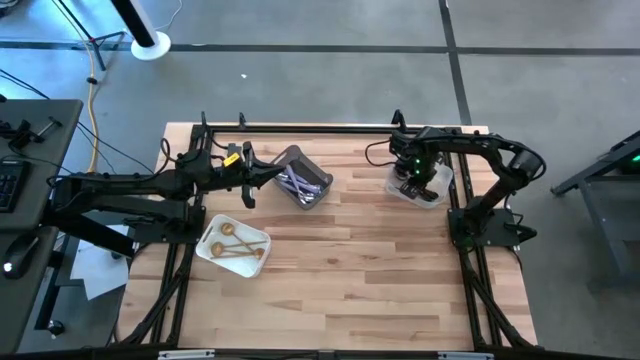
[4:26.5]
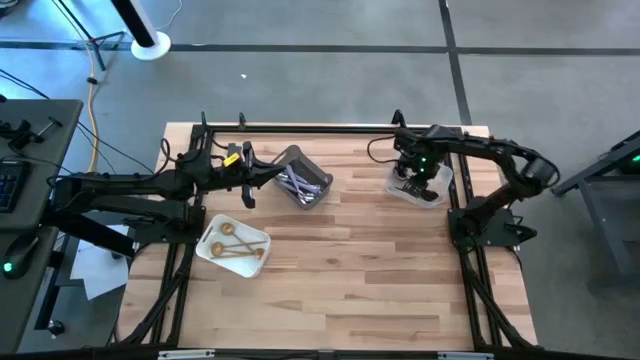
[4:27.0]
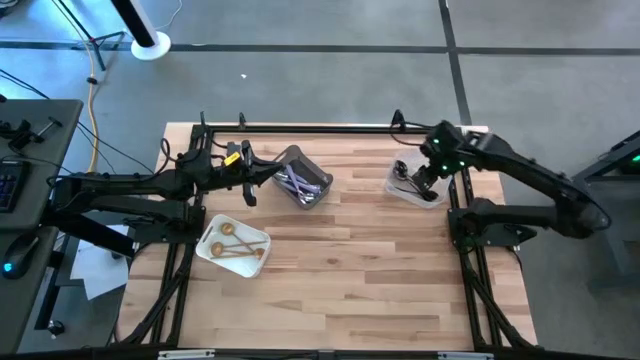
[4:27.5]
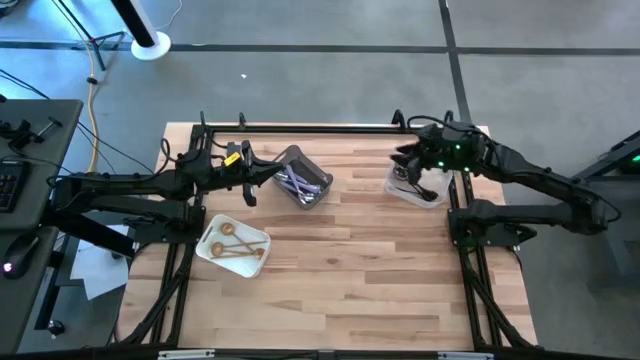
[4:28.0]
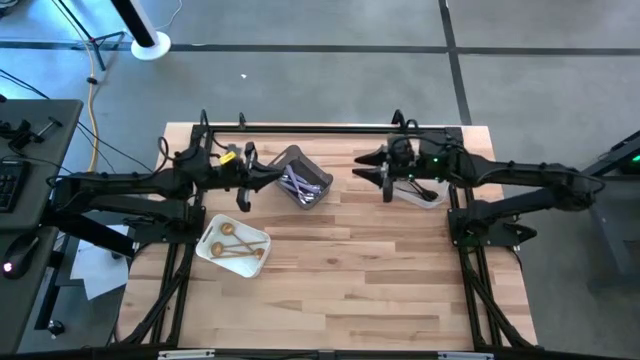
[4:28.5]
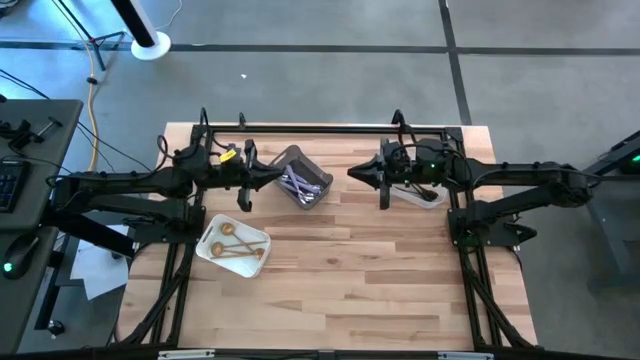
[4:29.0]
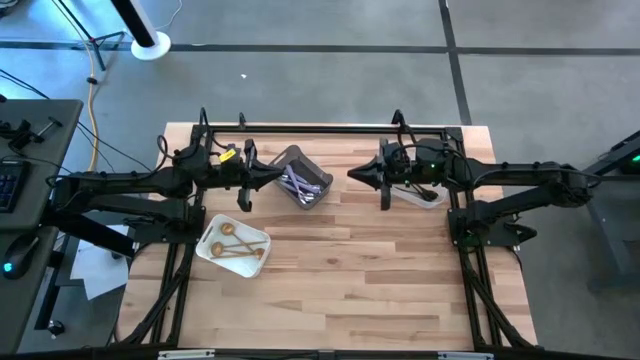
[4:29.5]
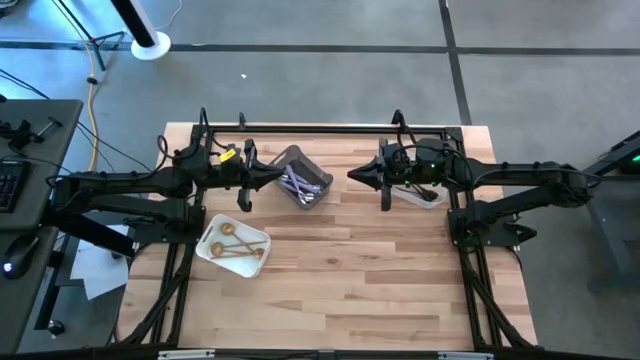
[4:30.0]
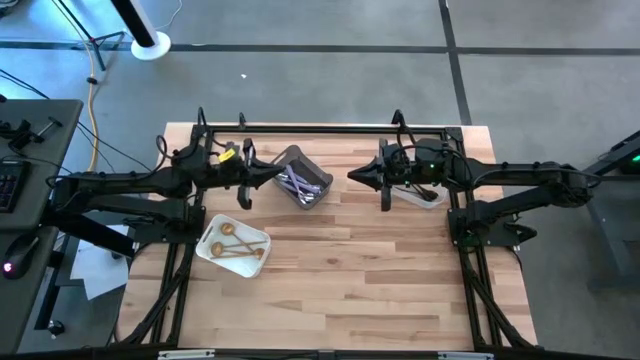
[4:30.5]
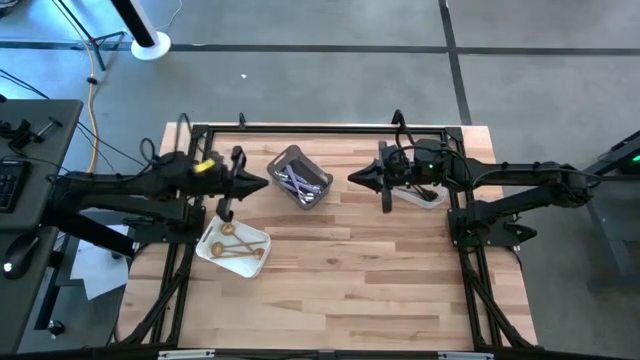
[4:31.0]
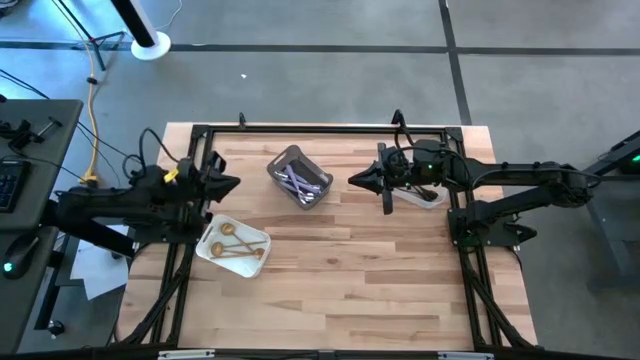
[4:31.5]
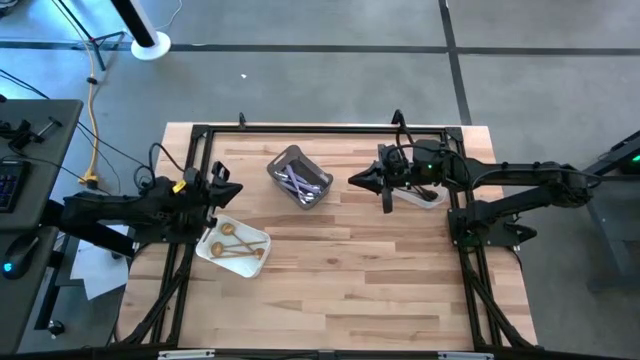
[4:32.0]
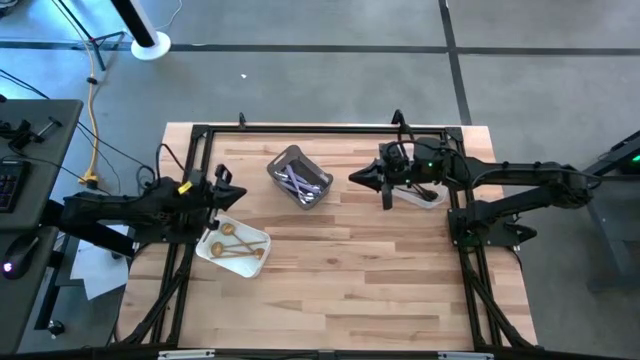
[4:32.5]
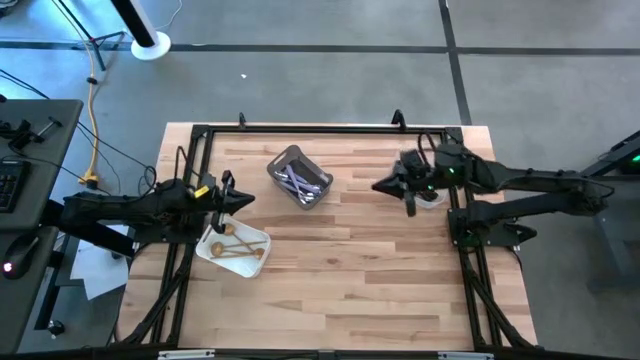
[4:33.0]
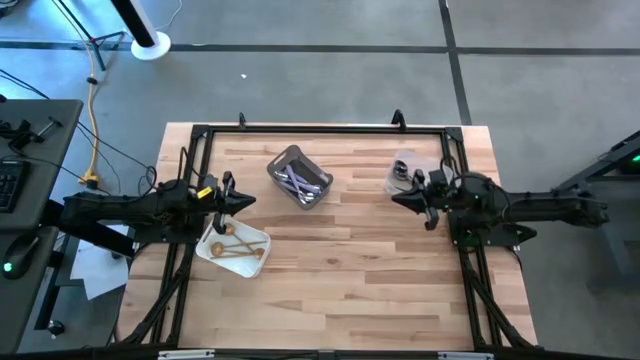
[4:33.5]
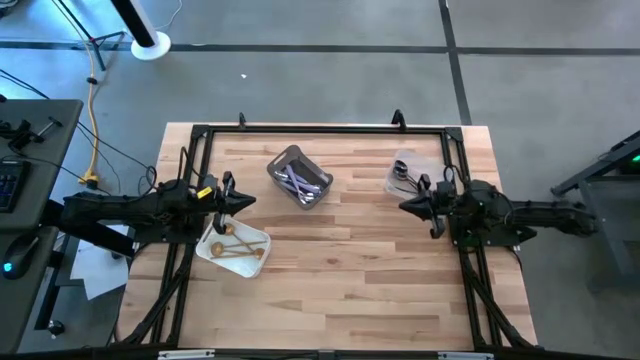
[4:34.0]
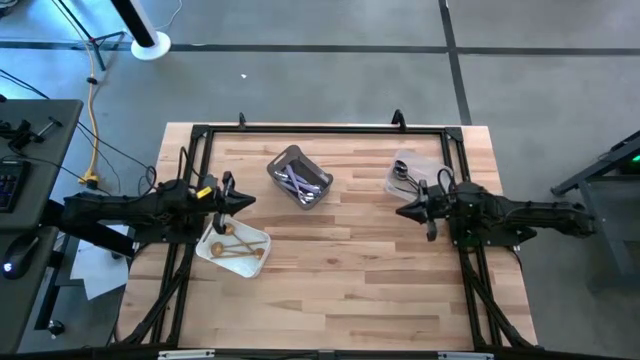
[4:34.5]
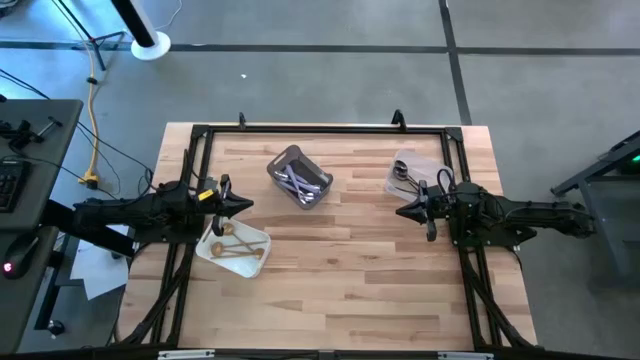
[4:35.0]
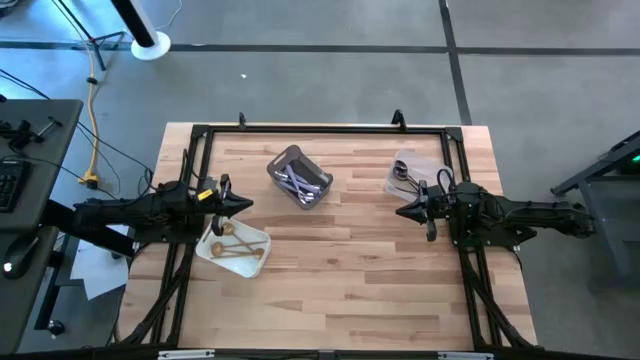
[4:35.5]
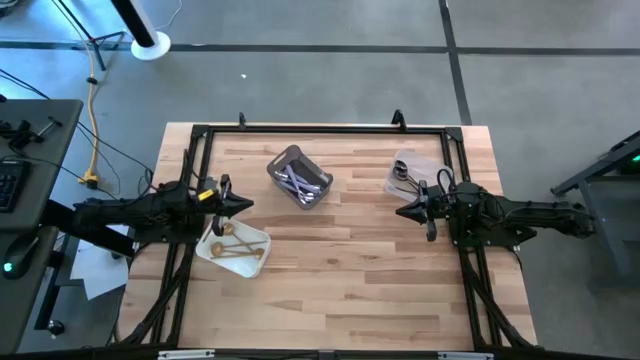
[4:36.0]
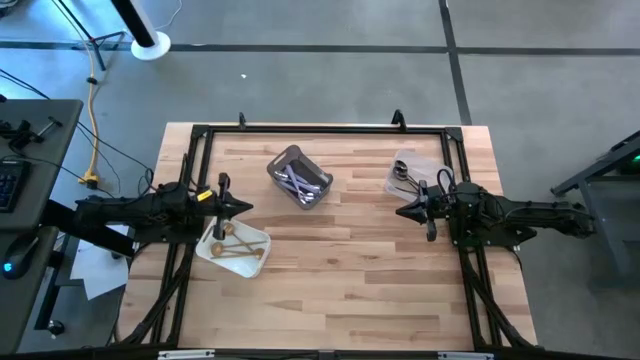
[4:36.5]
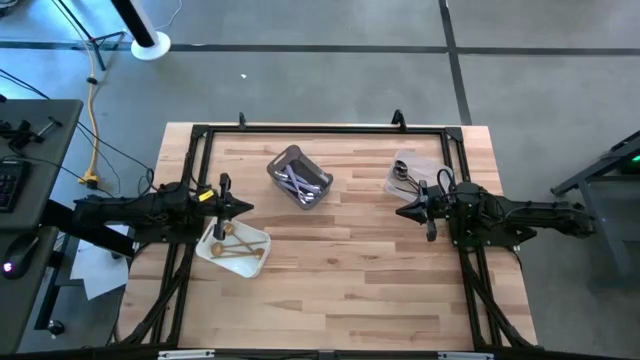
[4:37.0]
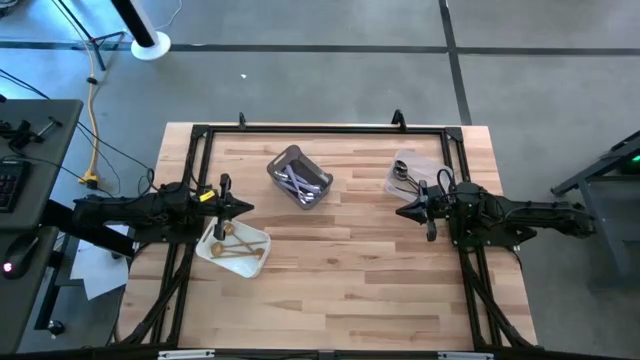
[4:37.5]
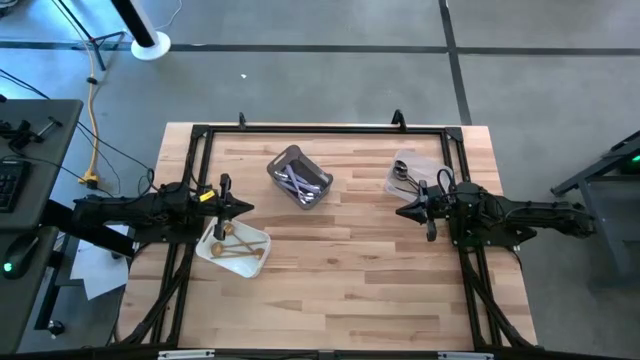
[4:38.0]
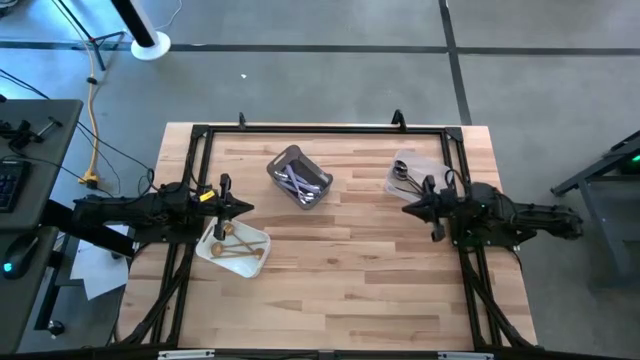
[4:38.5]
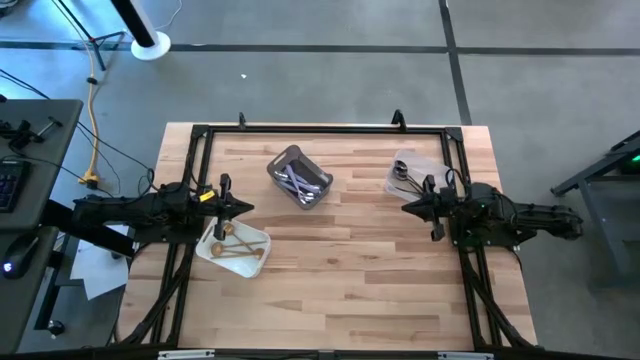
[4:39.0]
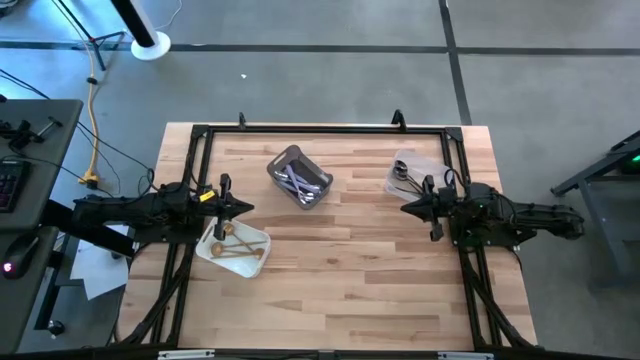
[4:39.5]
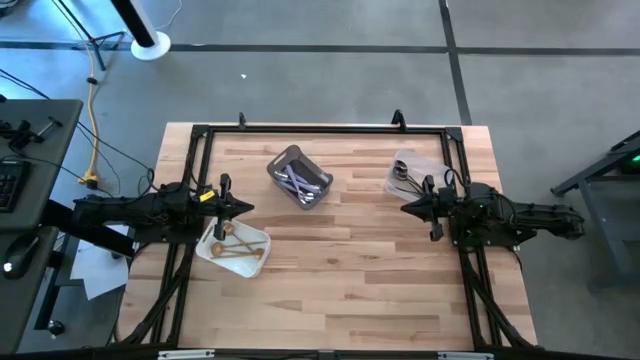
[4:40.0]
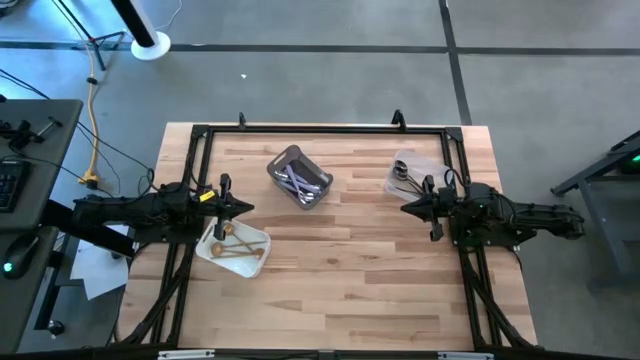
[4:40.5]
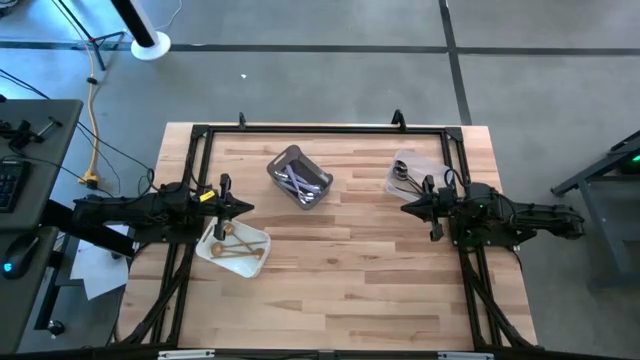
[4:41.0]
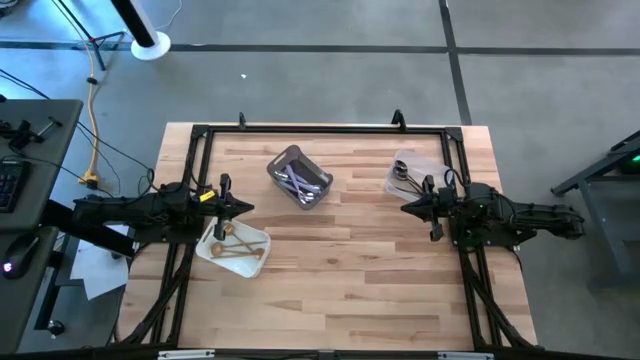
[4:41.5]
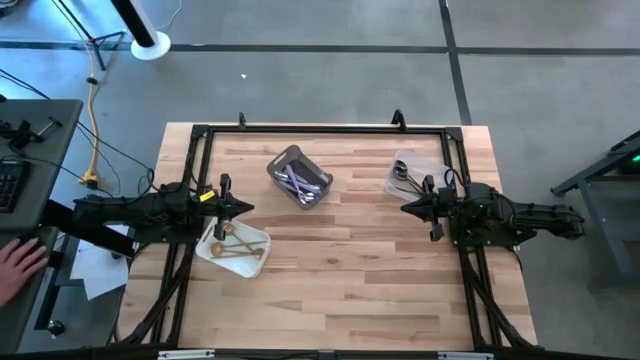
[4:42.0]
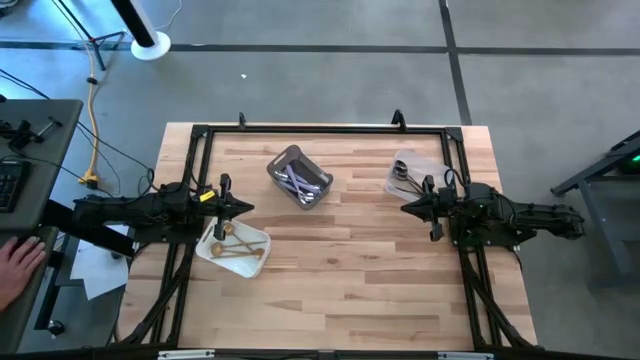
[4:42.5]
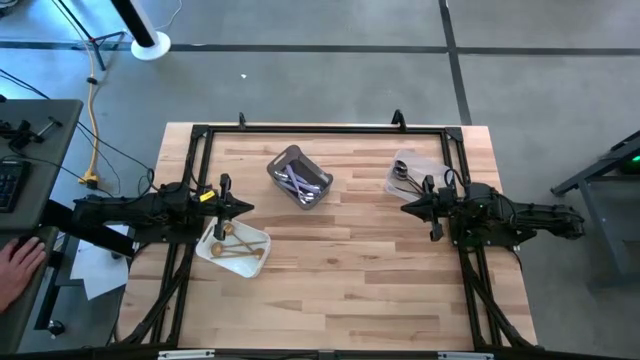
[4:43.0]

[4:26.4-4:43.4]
Task: Sort silverware by color (type)
Return to Home Position

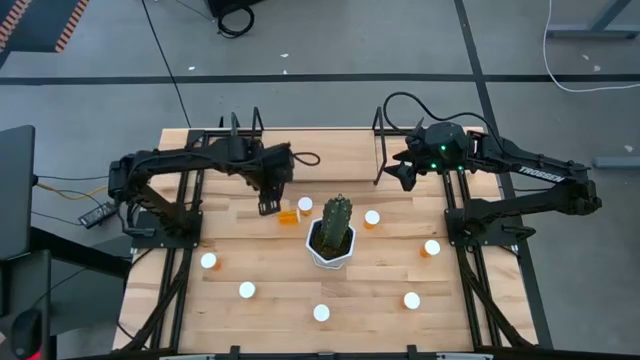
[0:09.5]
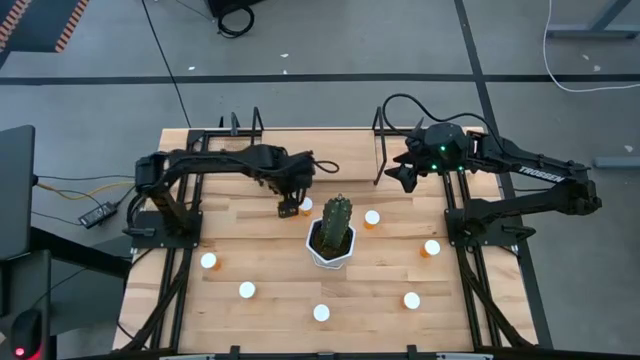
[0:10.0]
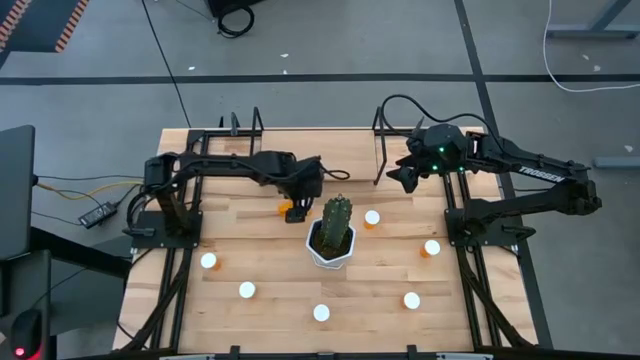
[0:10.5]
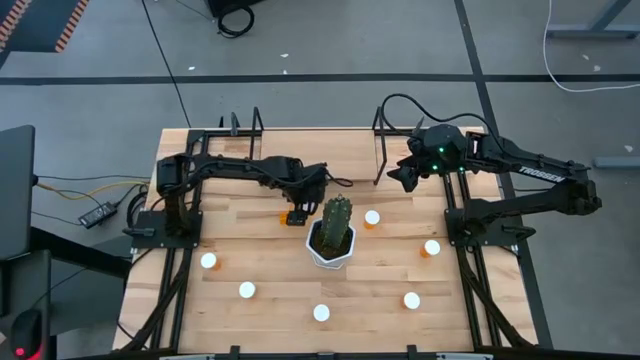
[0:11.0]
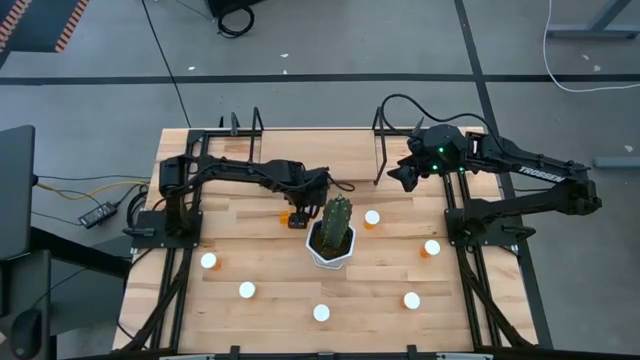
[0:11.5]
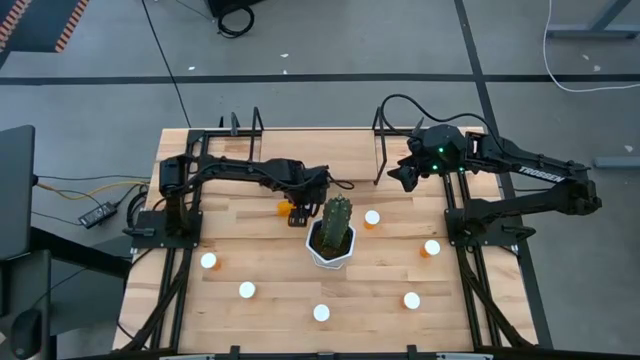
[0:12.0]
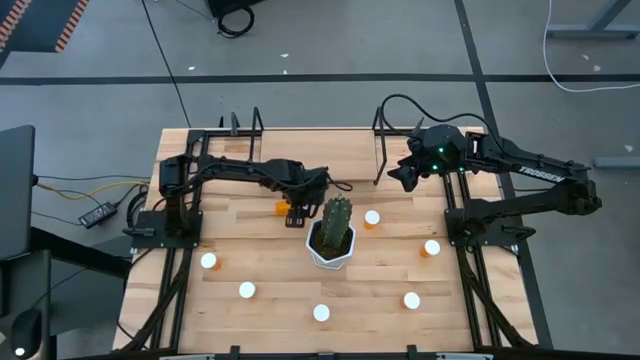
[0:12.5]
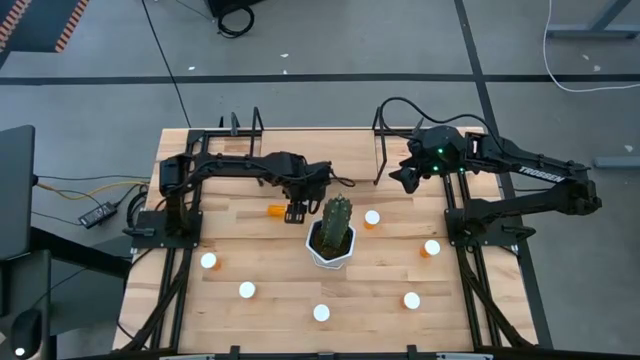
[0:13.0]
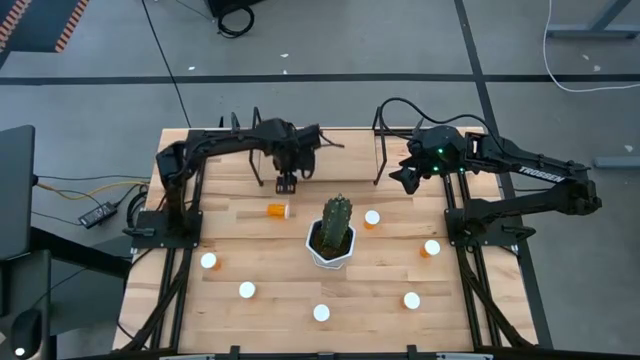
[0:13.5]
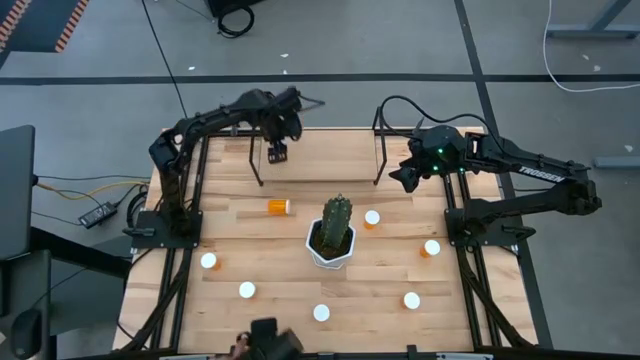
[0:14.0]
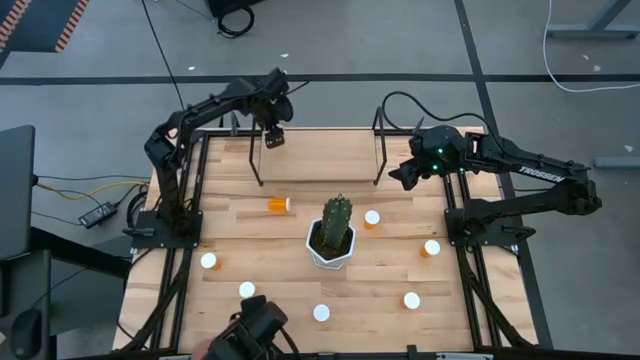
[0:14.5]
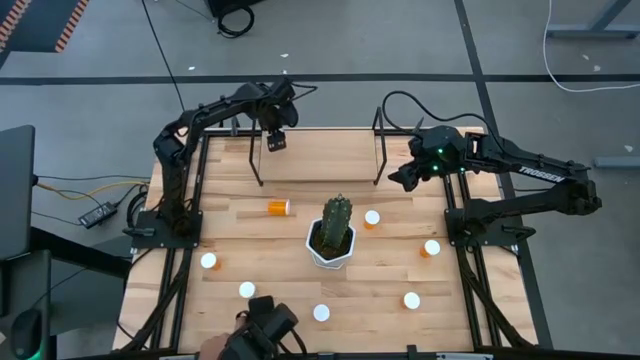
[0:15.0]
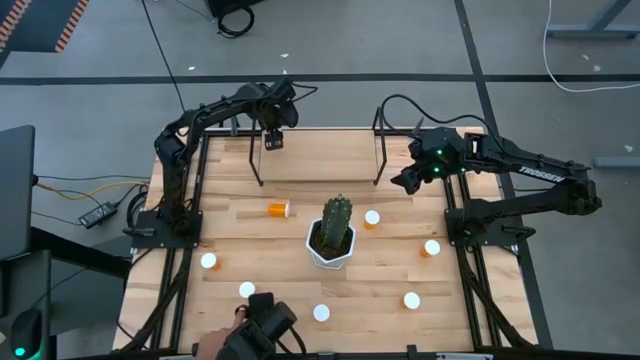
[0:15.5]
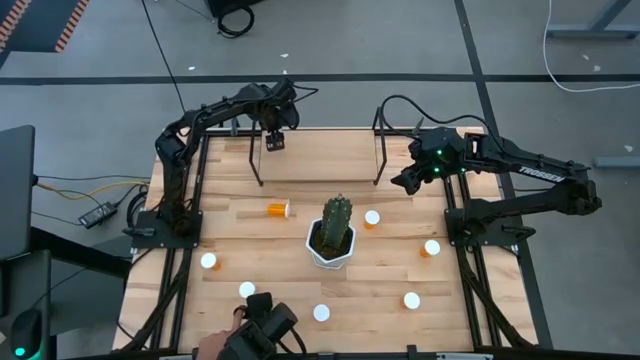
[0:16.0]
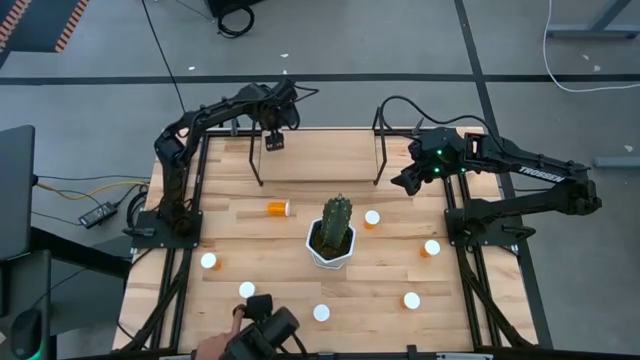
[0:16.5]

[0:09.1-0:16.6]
Task: Pick and place medicine bottles onto shelf by color
Put the orange medicine bottle on the shelf
